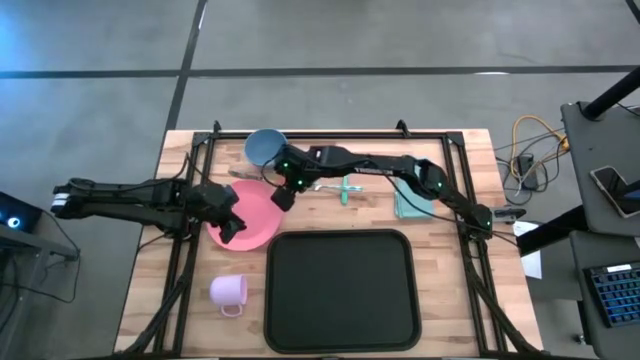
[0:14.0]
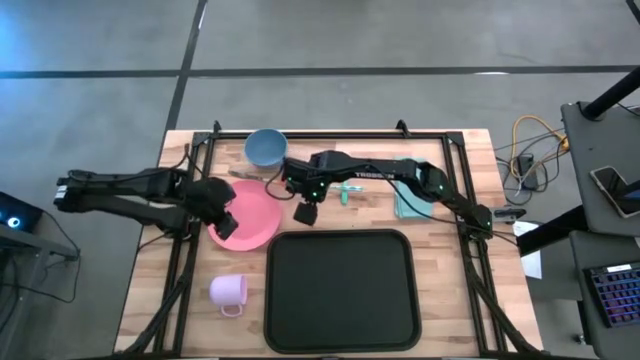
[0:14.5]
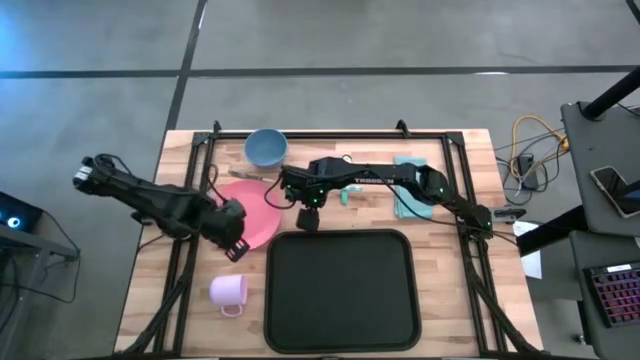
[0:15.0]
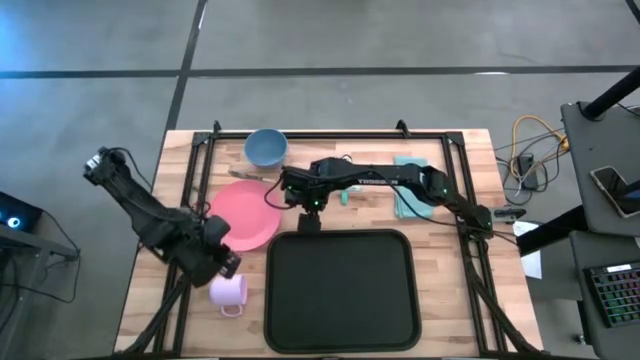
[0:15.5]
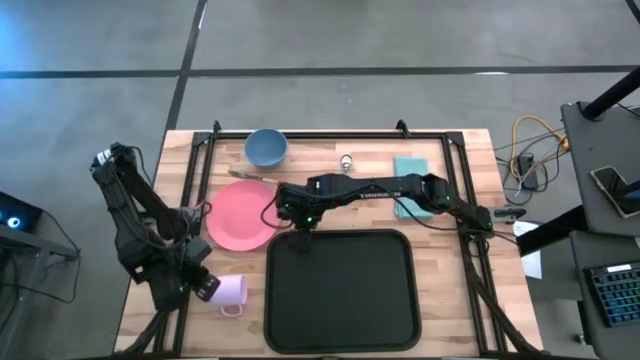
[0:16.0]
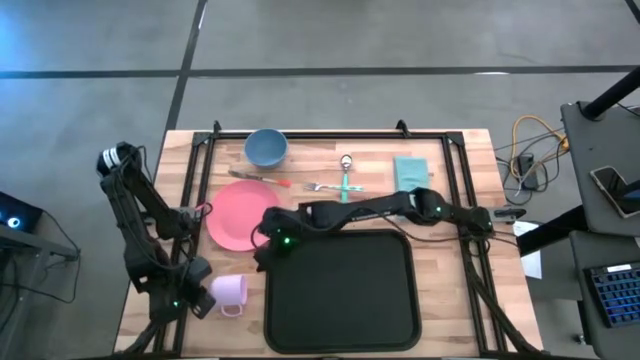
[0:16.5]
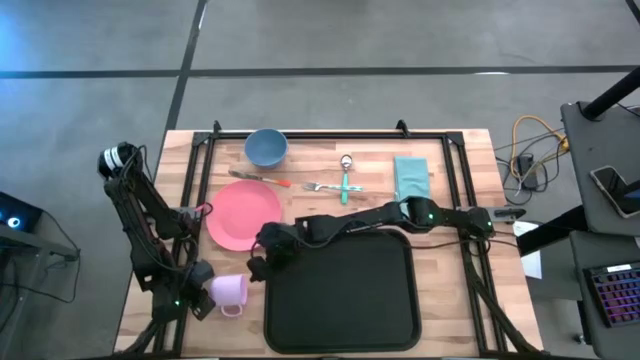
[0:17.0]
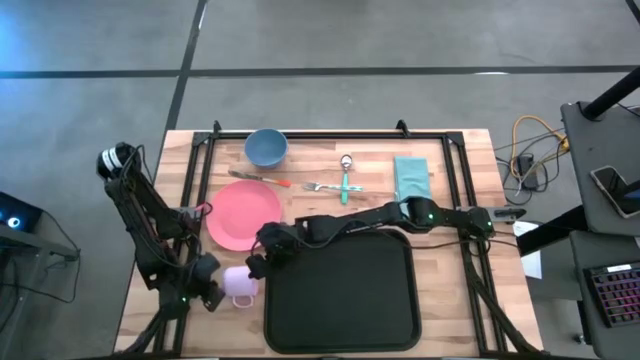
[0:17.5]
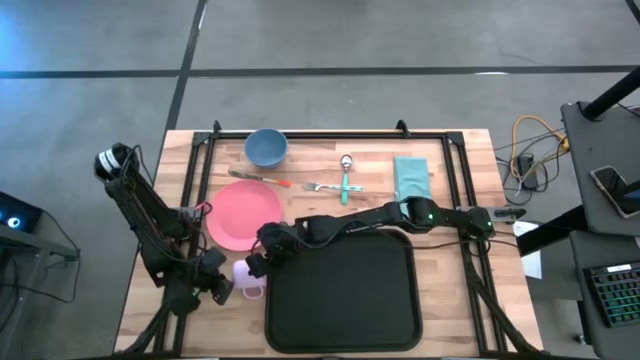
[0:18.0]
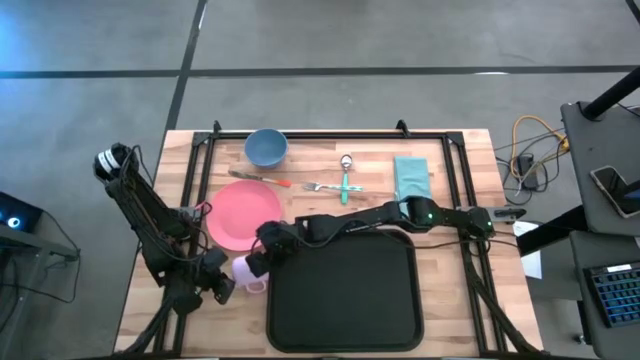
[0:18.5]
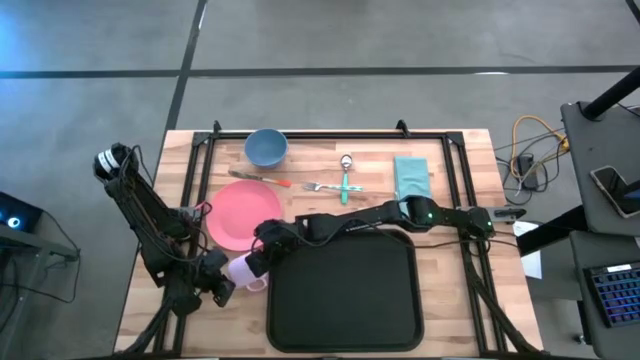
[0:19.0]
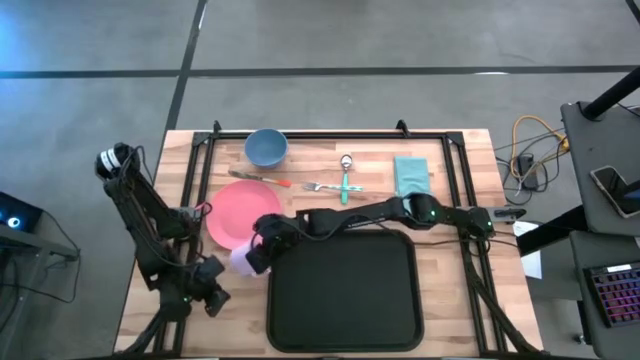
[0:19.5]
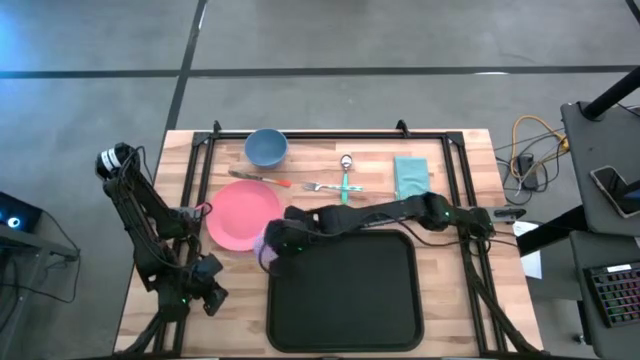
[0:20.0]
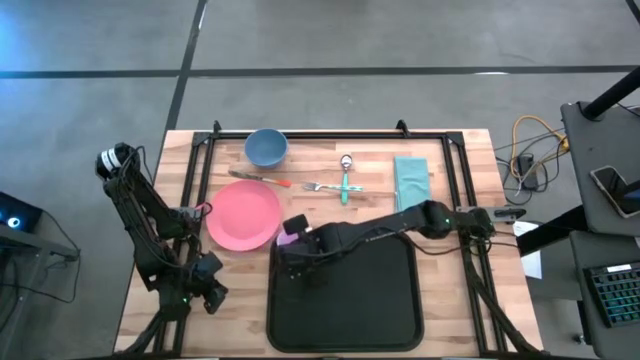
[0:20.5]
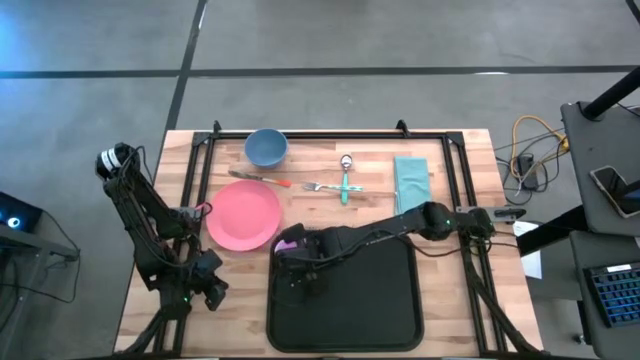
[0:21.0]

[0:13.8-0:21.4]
Task: Set up tray
Put the purple mug on the top left of the black tray

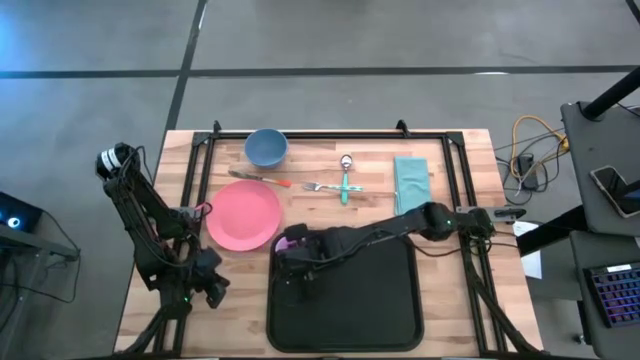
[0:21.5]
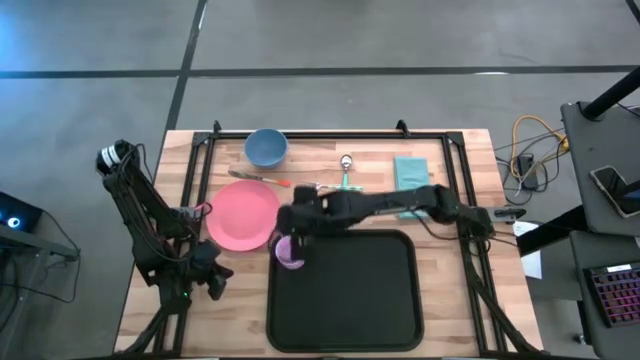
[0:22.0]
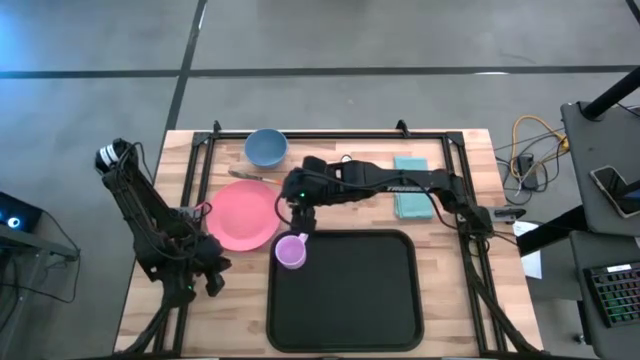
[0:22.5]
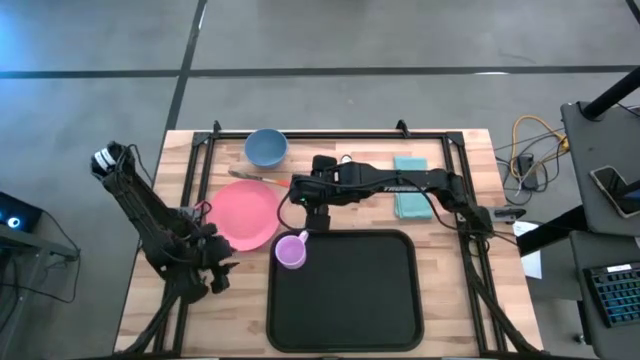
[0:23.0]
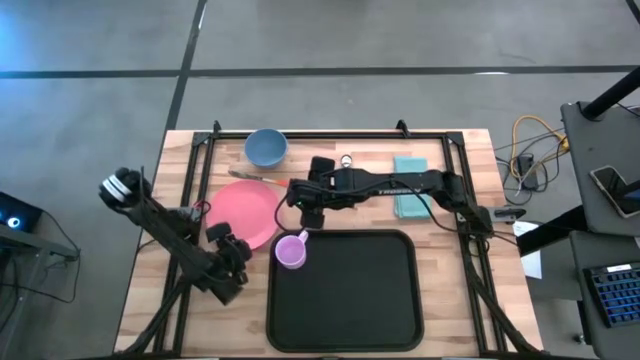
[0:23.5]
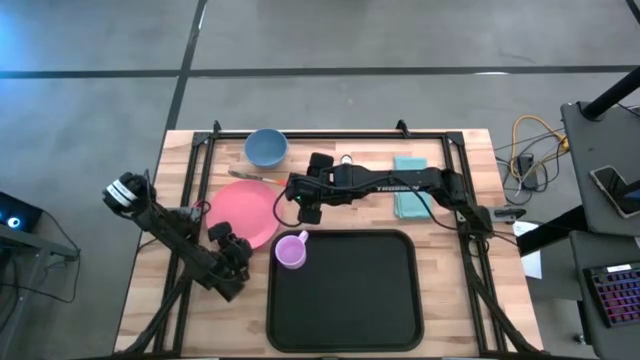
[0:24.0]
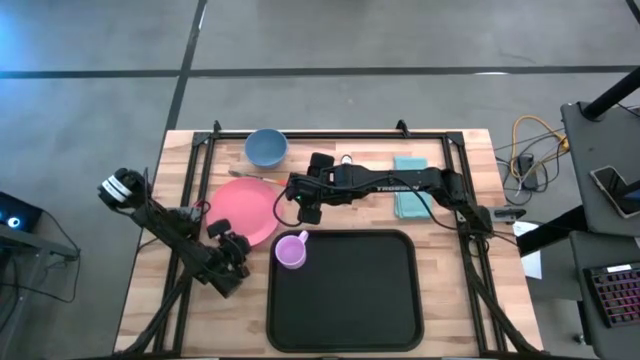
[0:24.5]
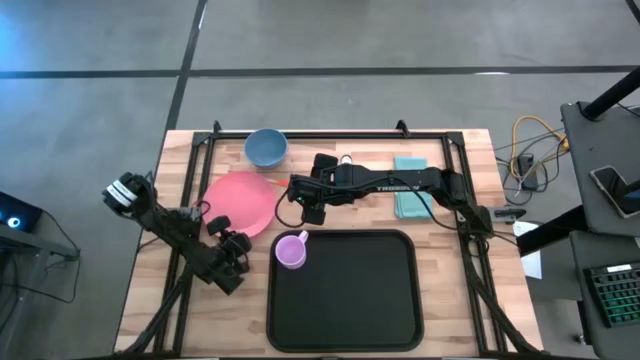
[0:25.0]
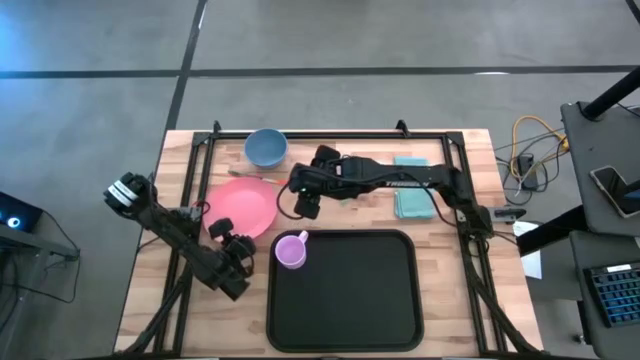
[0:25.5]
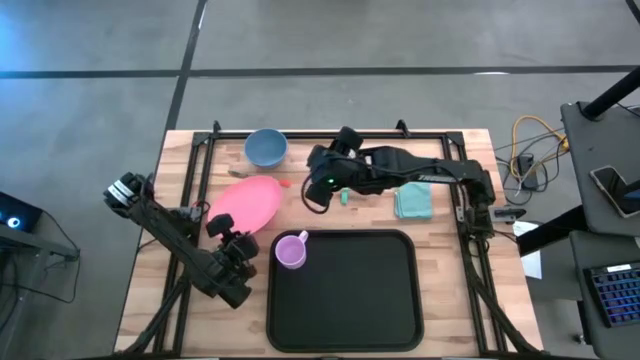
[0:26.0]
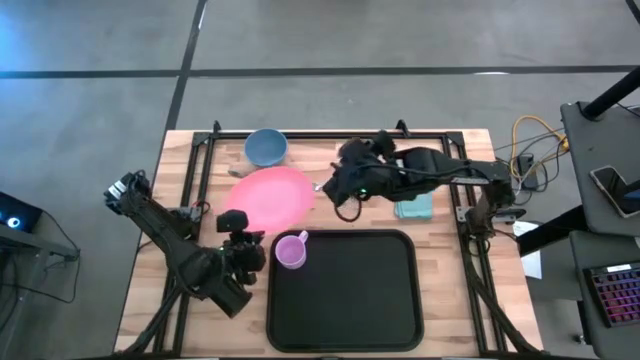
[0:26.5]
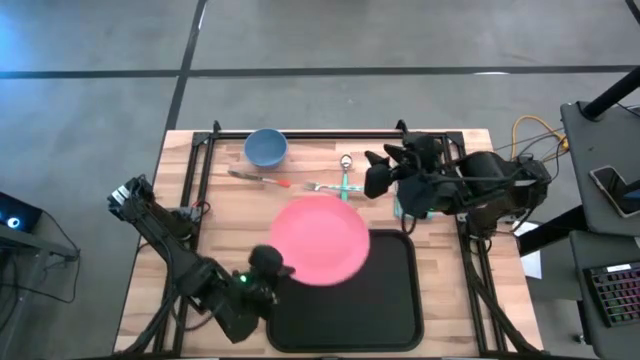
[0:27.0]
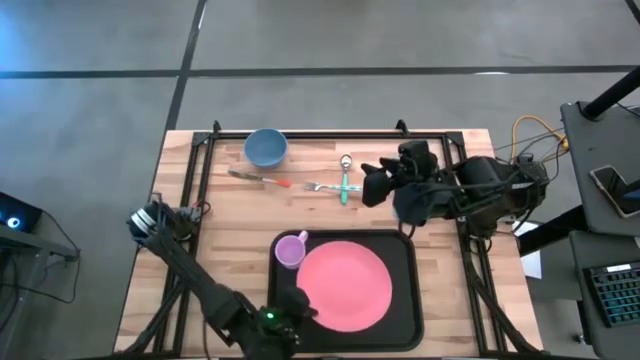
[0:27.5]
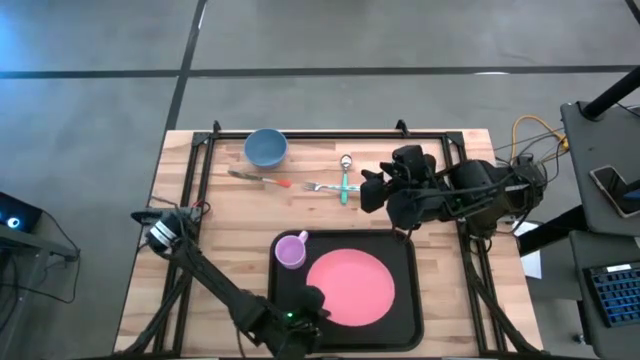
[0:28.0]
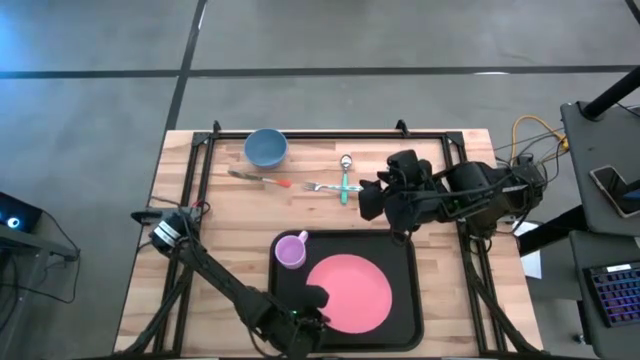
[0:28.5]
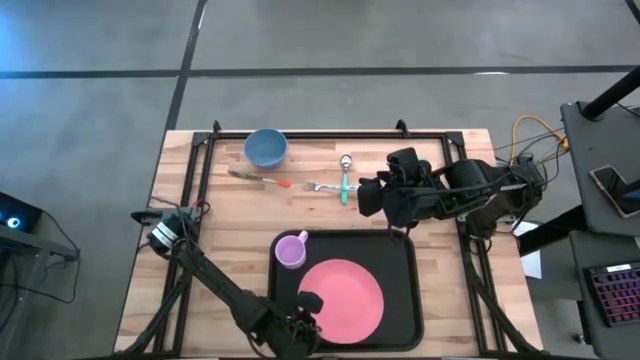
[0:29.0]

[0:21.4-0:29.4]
Put the pink plate on the black tray to the bottom right of the purple mug

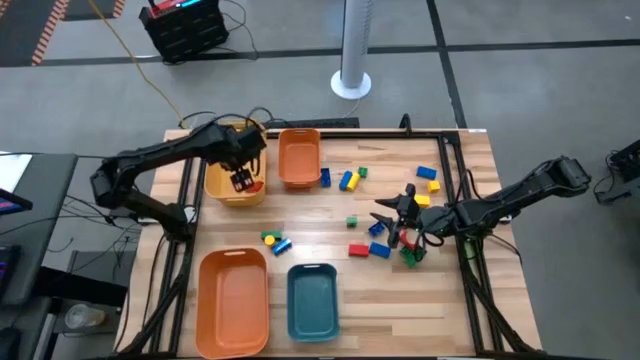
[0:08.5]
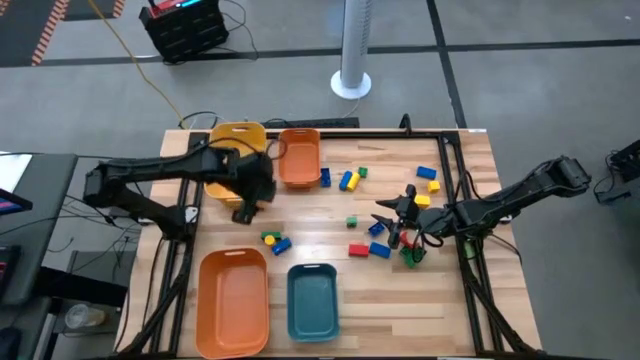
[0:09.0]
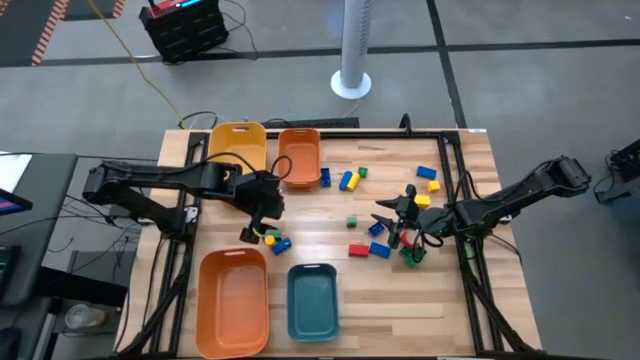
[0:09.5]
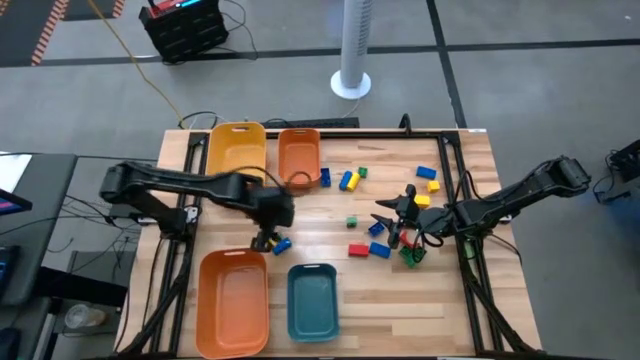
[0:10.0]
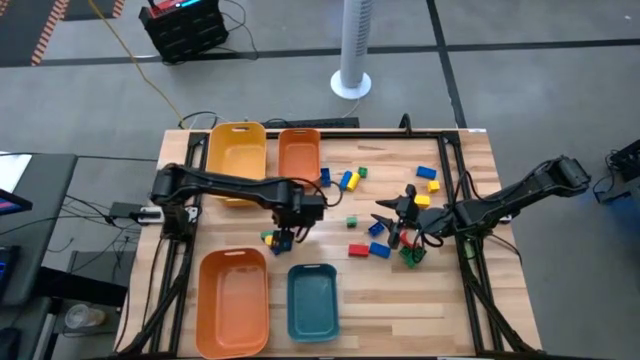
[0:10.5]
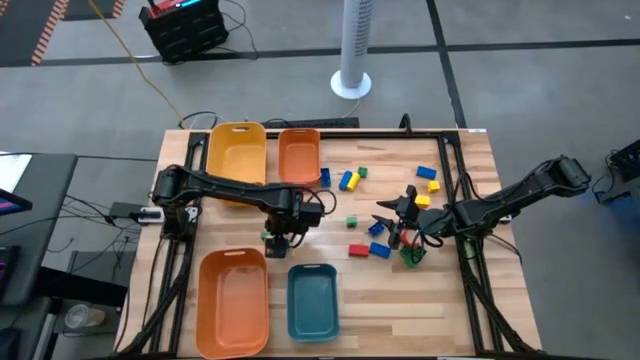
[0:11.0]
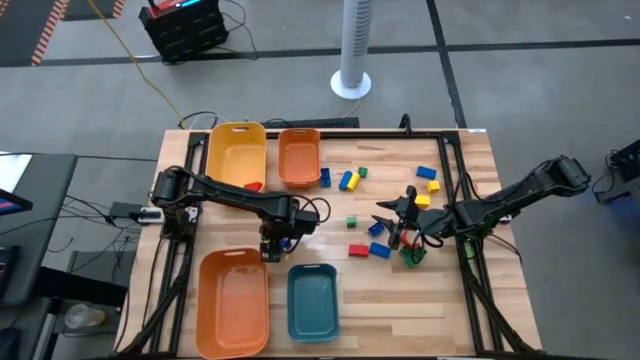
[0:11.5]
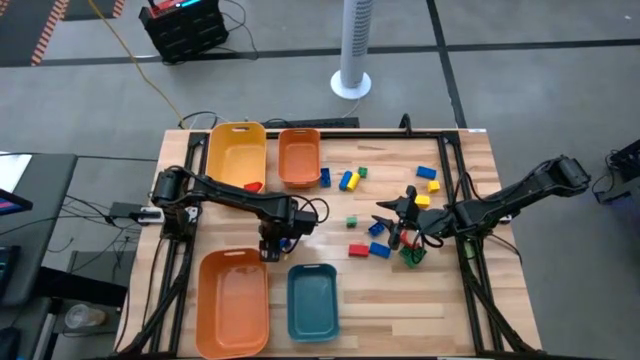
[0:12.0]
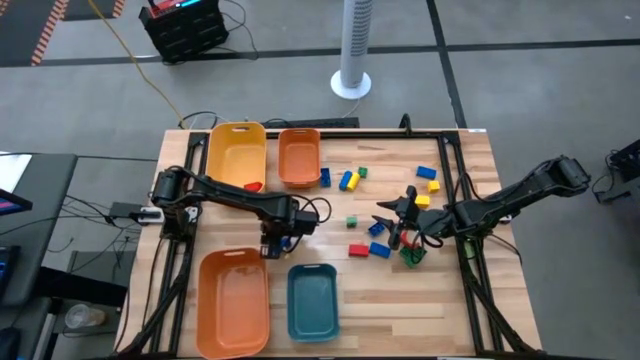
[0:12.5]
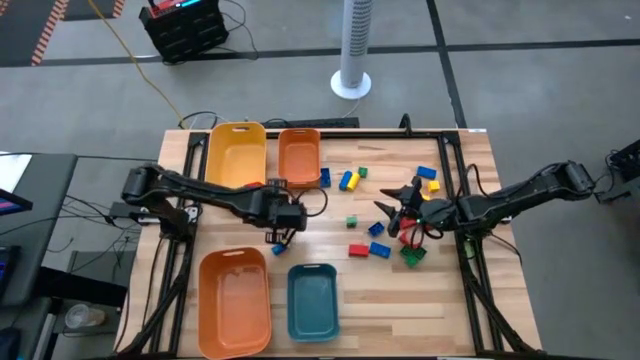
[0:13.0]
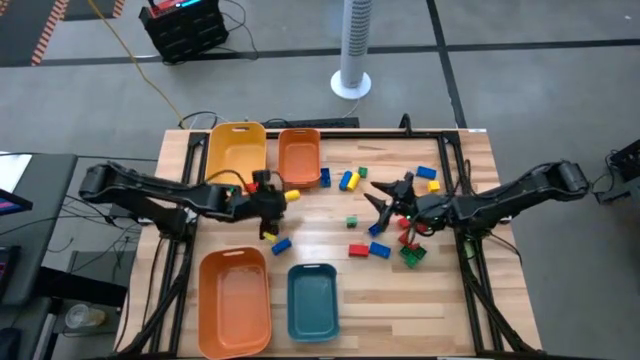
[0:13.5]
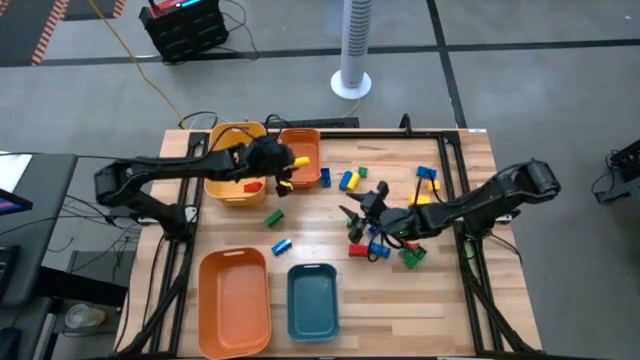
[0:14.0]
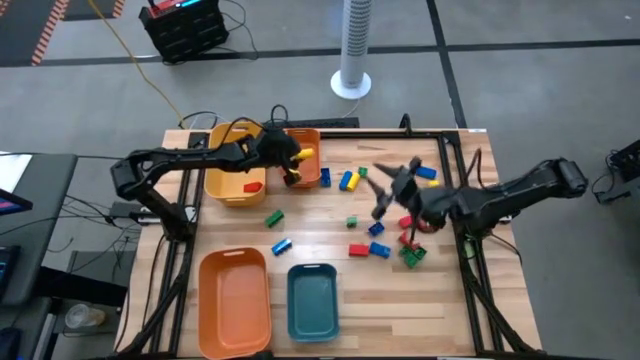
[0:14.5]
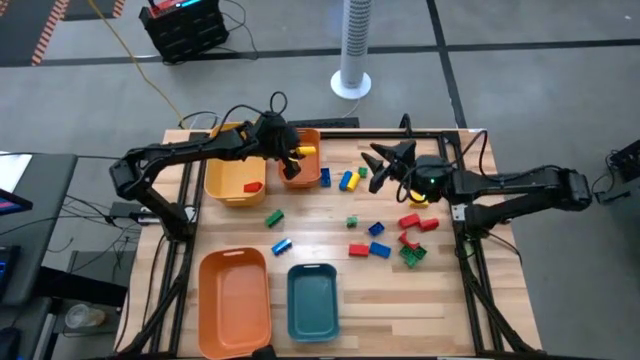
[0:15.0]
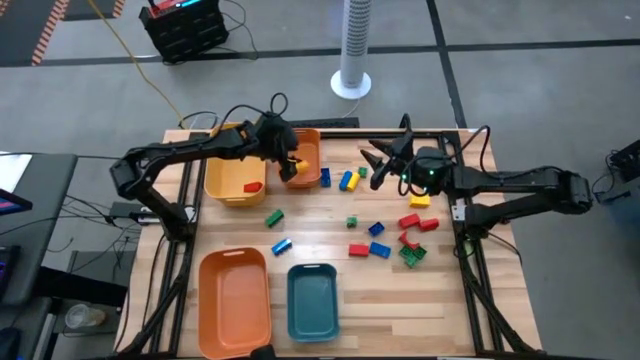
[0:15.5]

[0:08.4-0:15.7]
Task: Sort blocks
Put the yellow wooden block into the small orange bin
